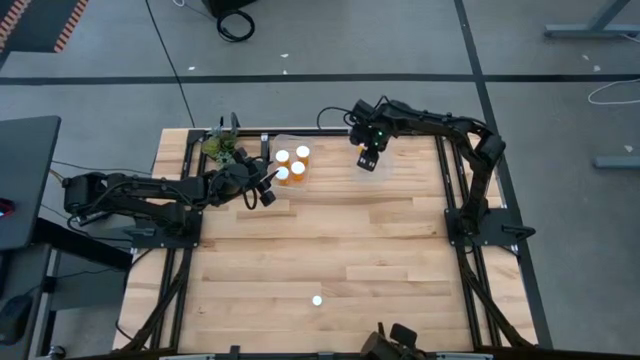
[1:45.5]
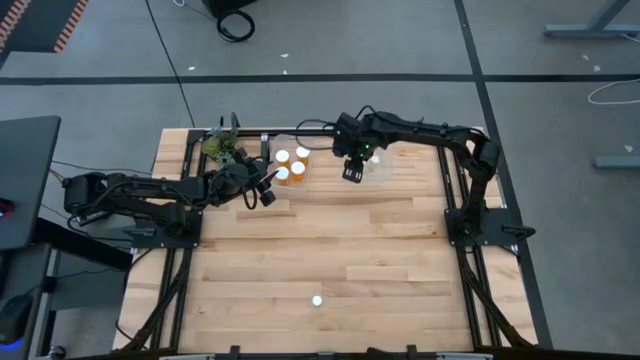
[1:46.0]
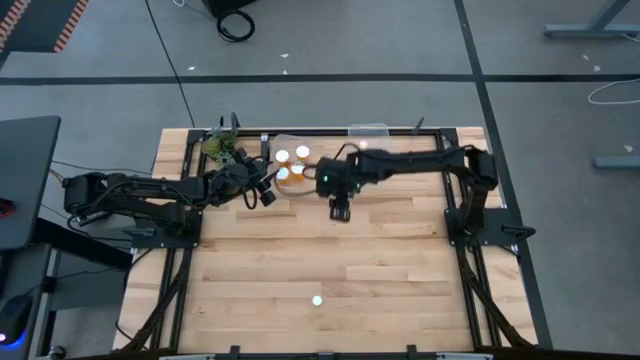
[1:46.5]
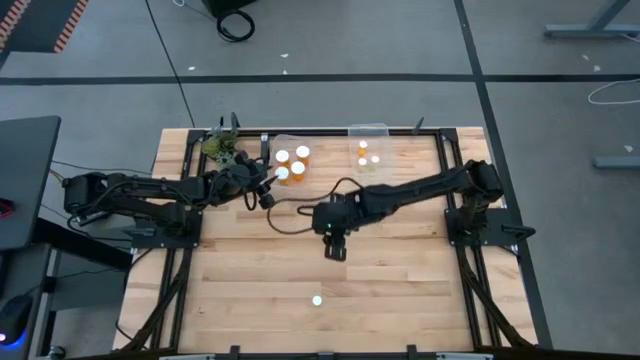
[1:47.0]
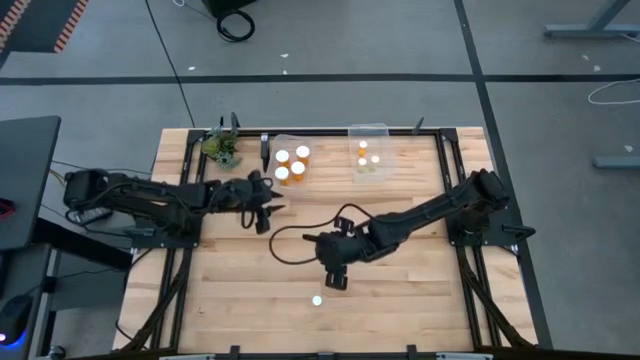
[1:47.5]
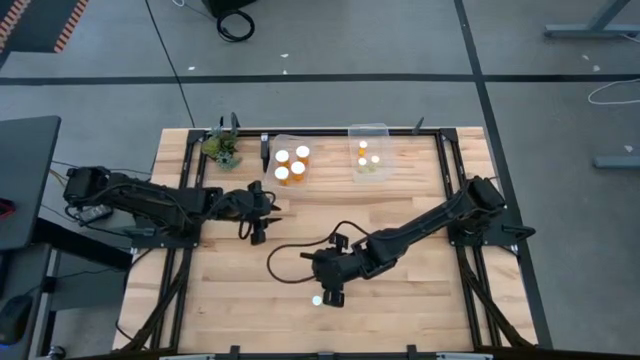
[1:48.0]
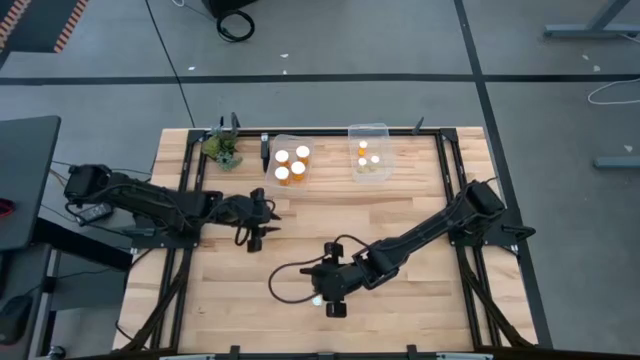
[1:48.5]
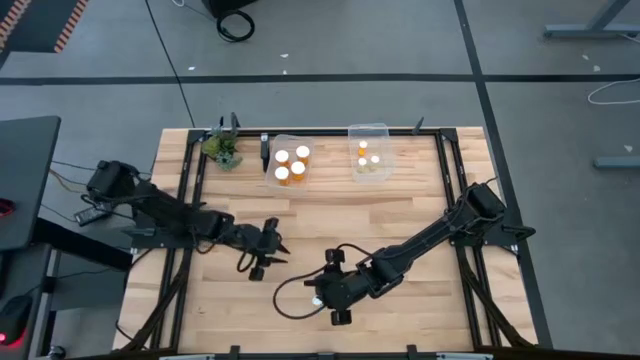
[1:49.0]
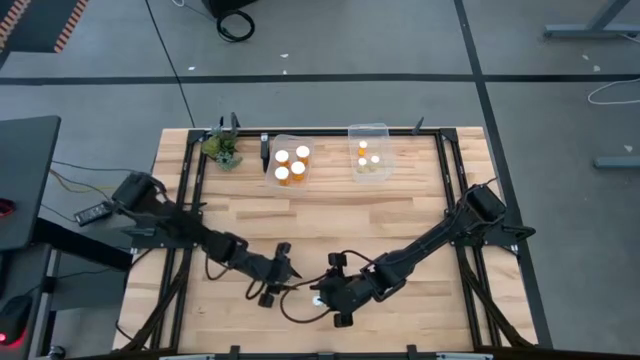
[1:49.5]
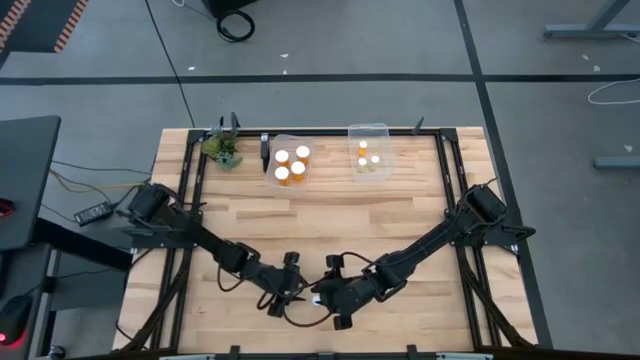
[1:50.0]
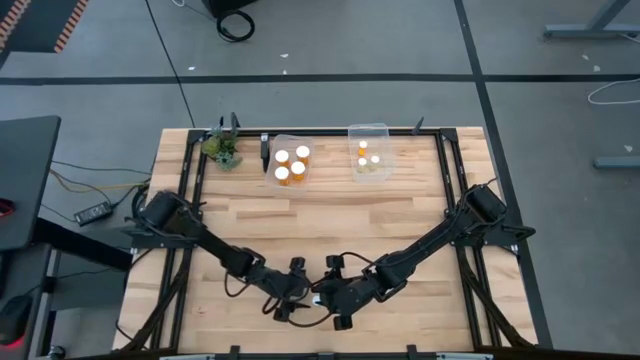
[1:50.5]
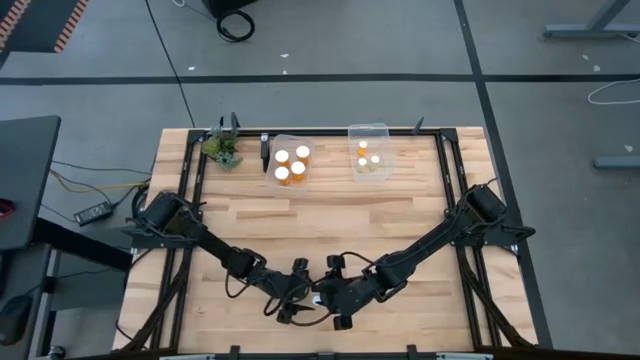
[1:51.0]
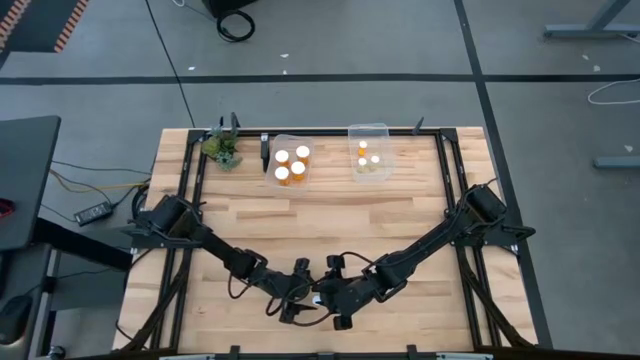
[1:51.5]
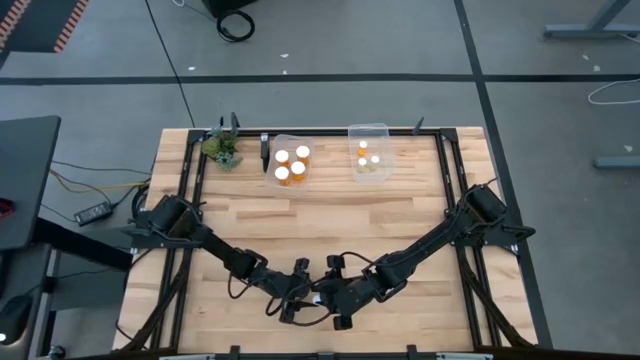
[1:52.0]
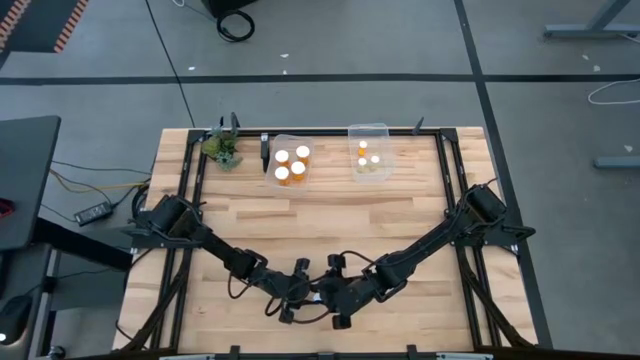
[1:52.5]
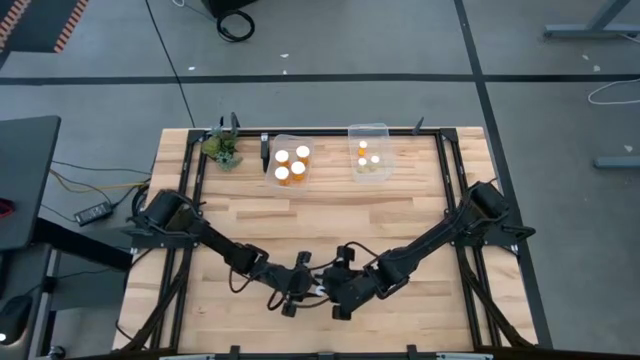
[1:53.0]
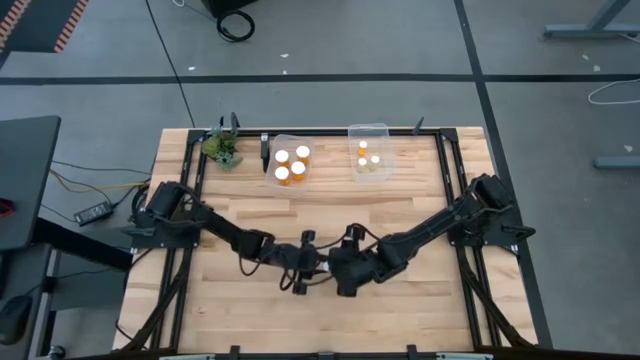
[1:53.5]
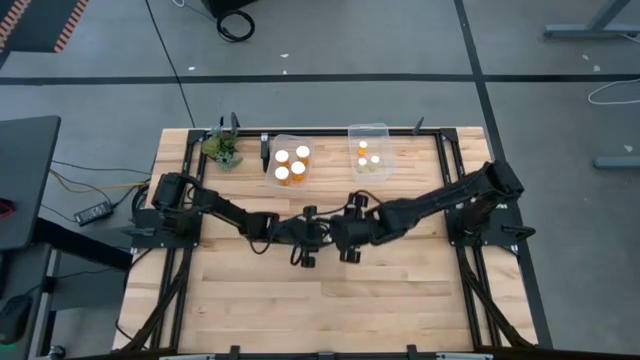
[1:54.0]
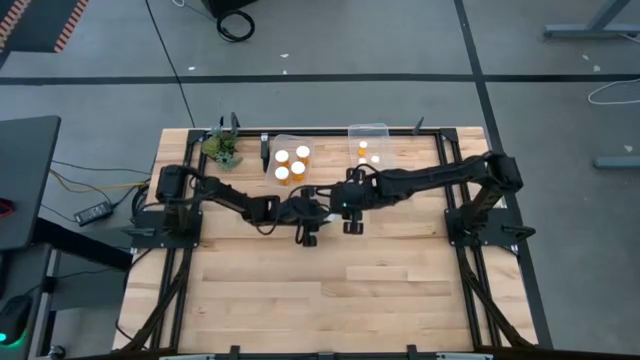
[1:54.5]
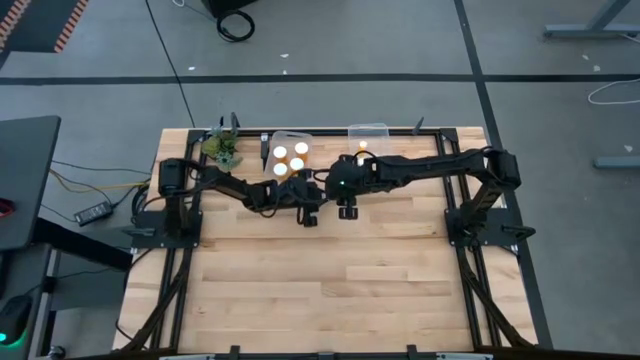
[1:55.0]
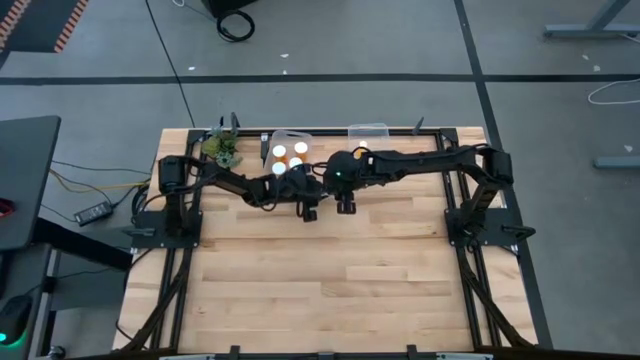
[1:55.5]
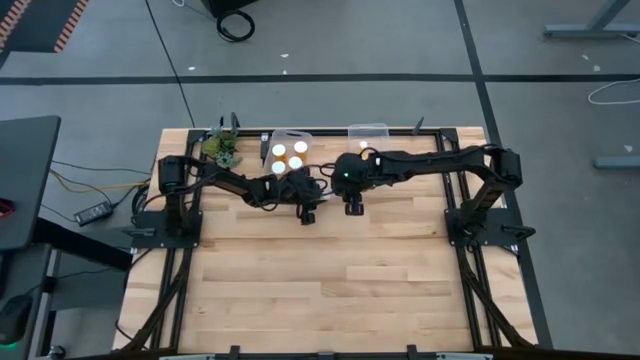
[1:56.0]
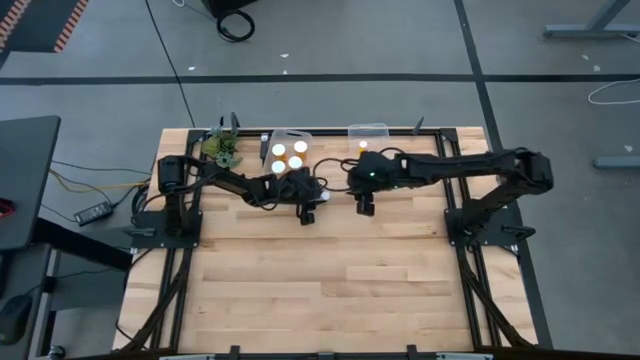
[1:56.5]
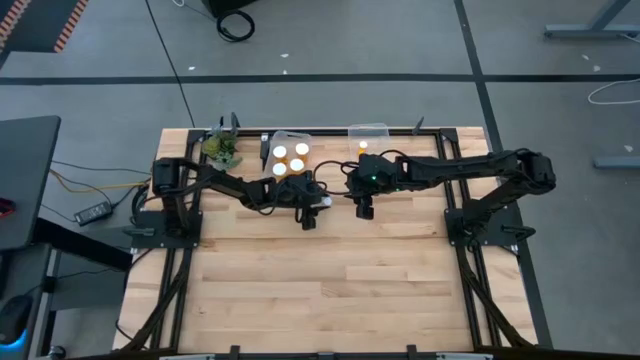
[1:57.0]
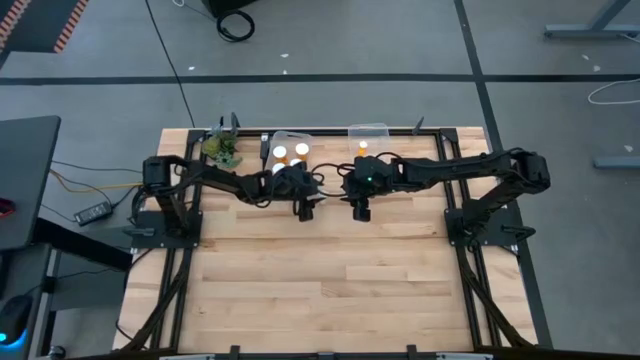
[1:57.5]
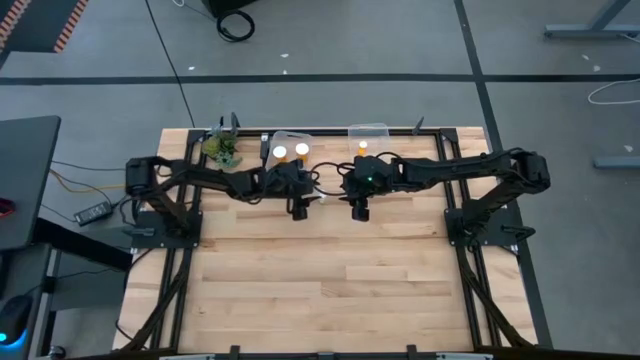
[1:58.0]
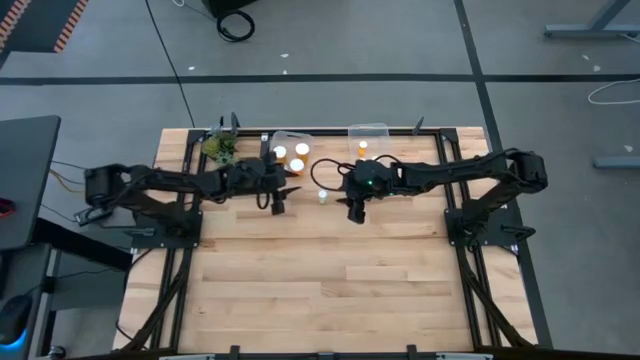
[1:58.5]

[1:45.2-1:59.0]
Task: Pick and place medicine bottles into bin by pill shape (circle, oval)
Put the small yellow pill bottle into the right transparent bin

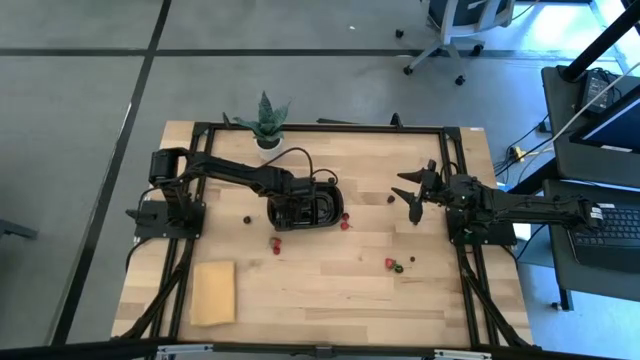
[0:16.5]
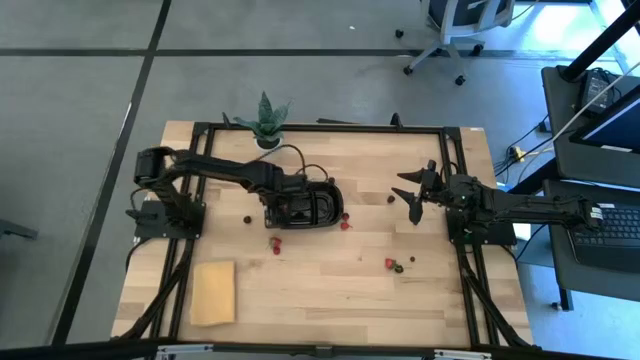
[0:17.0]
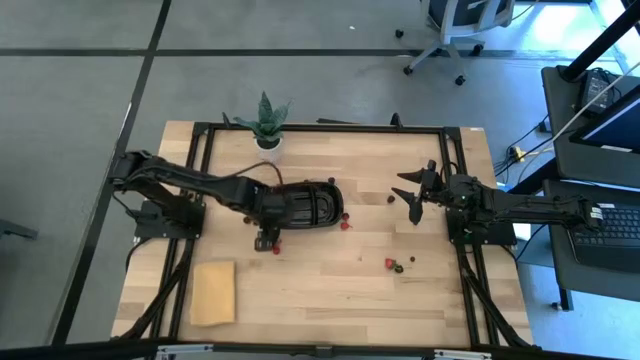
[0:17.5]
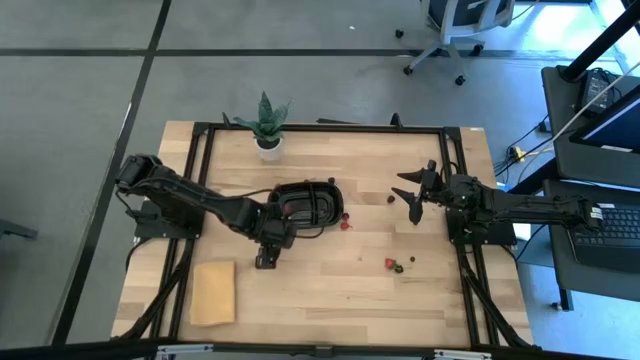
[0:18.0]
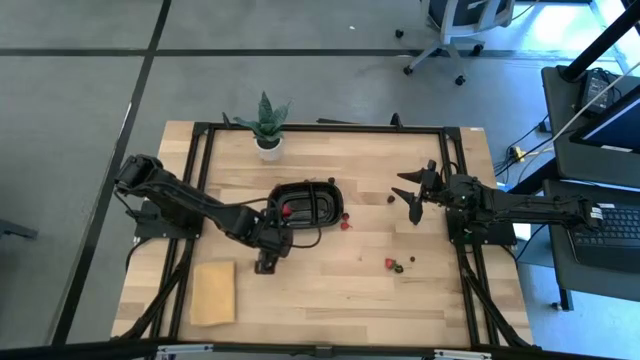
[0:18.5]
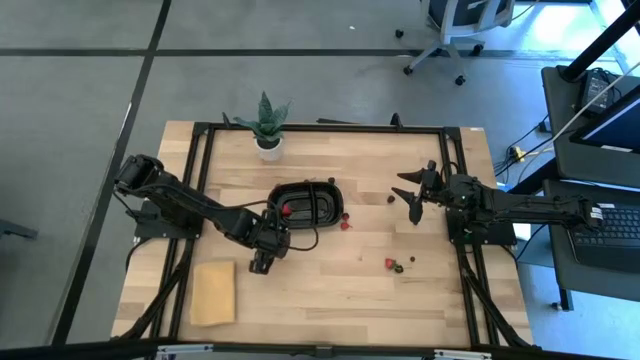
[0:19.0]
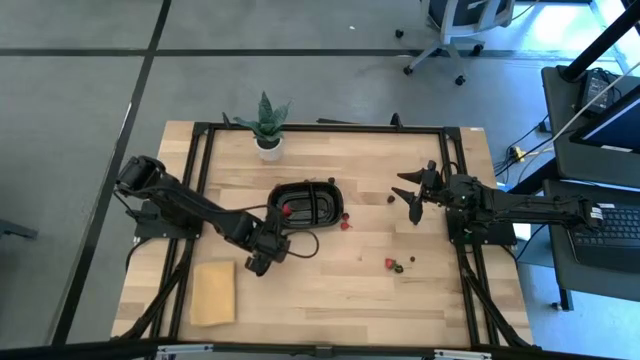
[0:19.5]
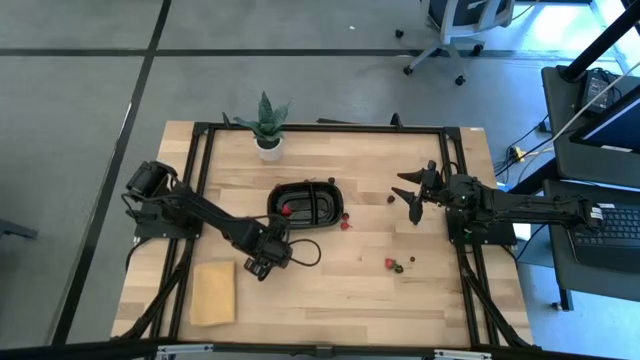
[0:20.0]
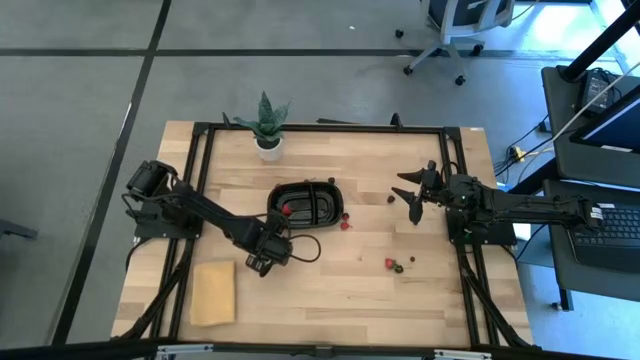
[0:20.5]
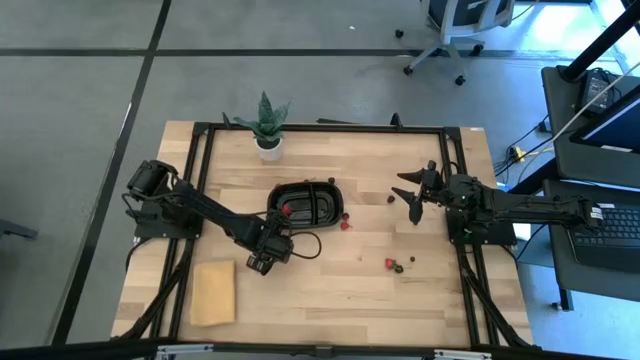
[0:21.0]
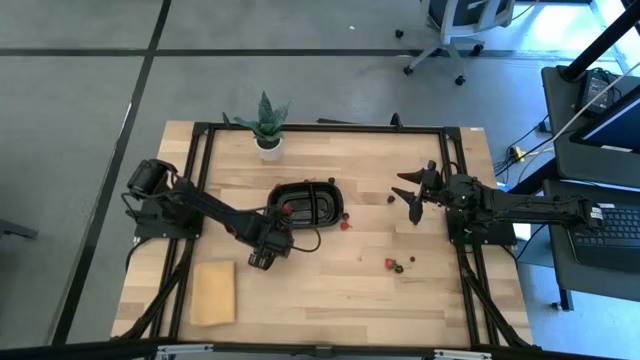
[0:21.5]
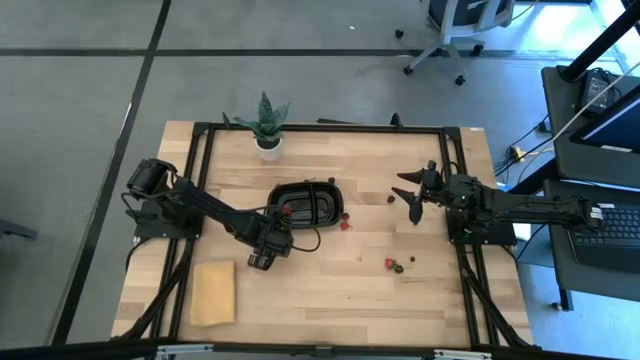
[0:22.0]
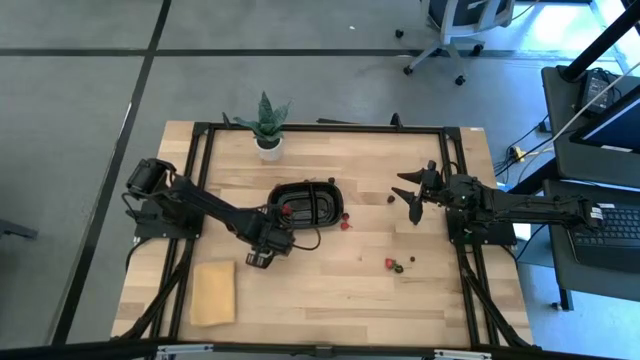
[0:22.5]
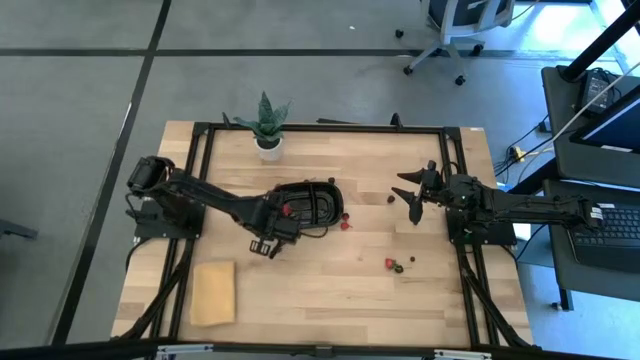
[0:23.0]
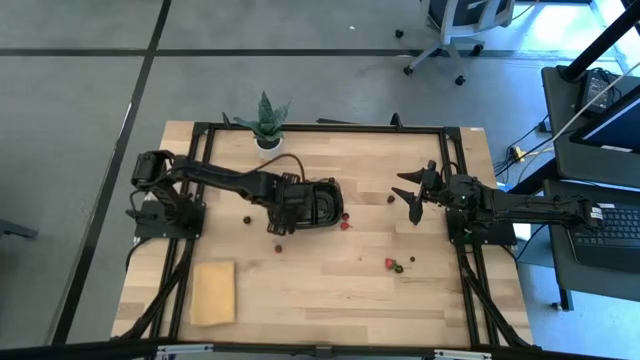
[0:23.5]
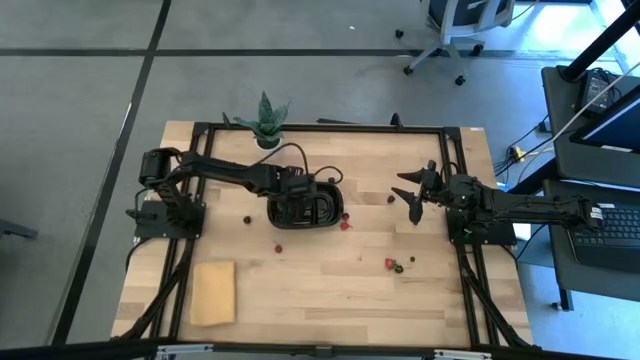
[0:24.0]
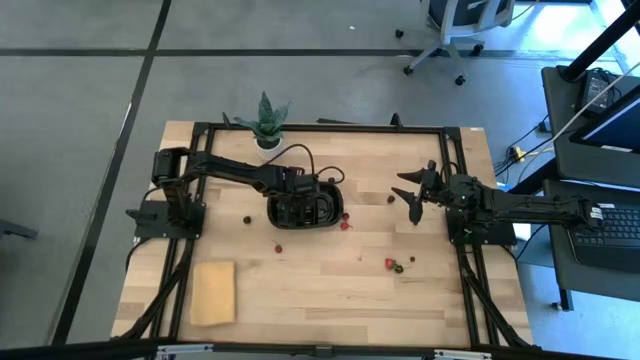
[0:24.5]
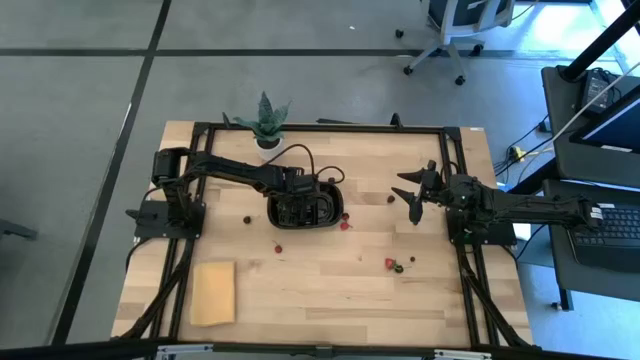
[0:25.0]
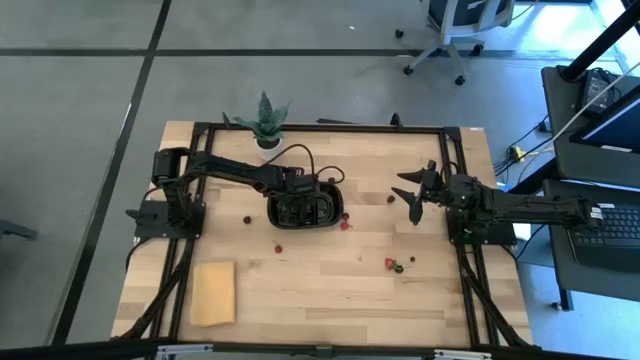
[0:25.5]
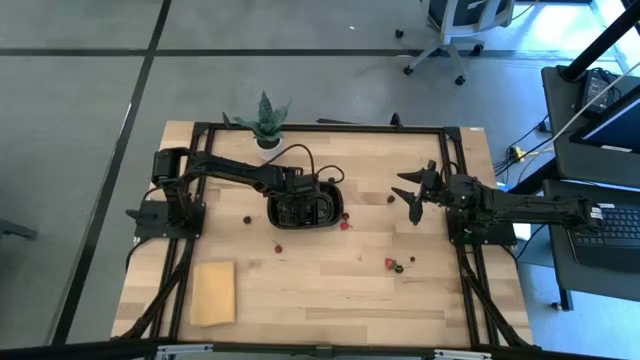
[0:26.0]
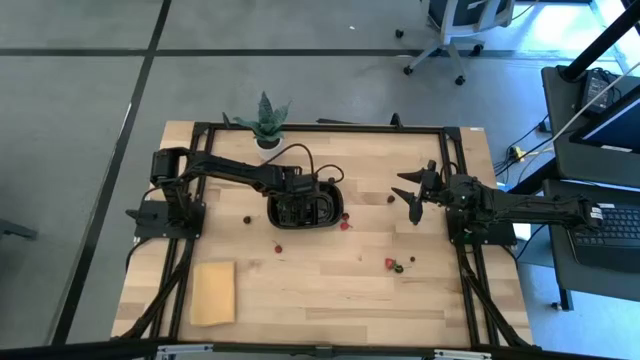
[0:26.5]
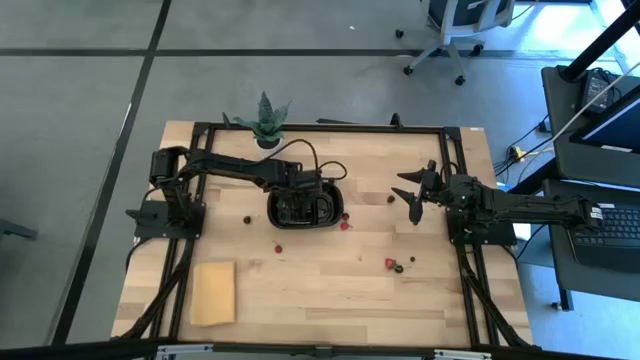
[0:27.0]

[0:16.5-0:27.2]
Task: Pick and placing Produce into tupperware
Put the left red strawberry into the black bin
